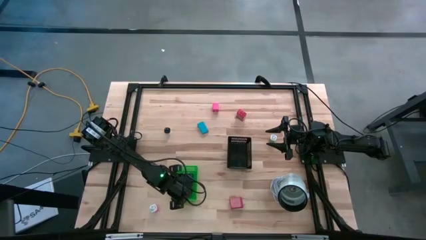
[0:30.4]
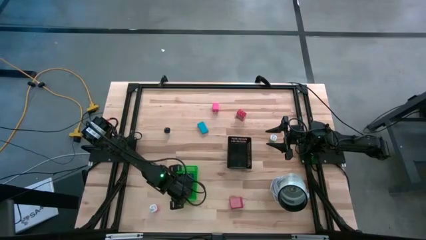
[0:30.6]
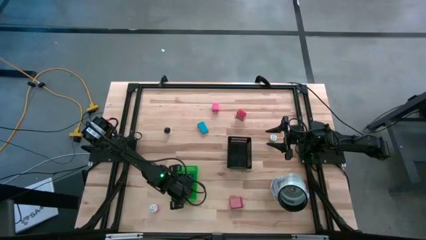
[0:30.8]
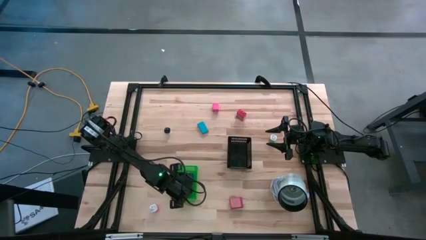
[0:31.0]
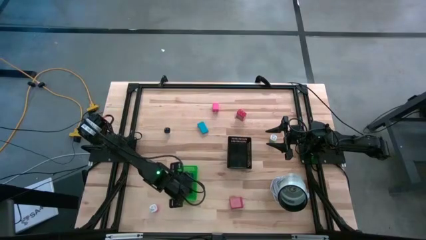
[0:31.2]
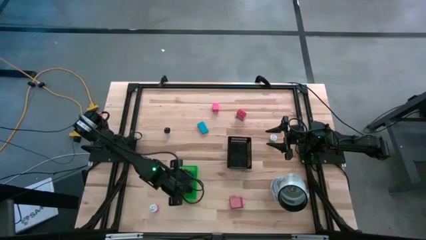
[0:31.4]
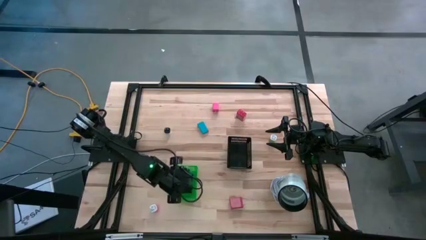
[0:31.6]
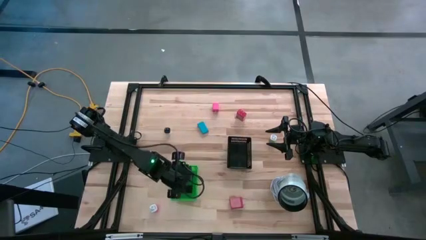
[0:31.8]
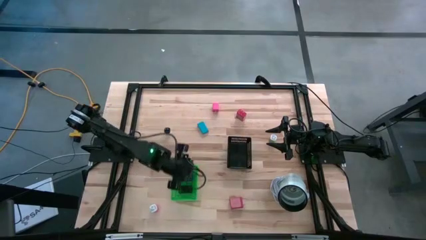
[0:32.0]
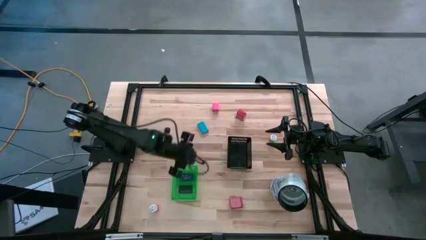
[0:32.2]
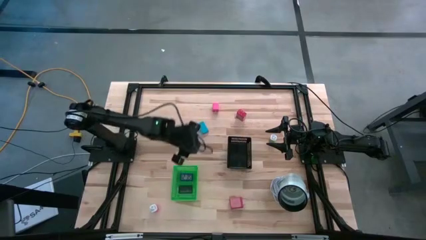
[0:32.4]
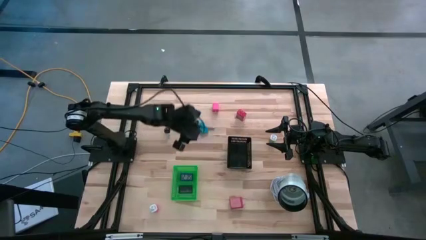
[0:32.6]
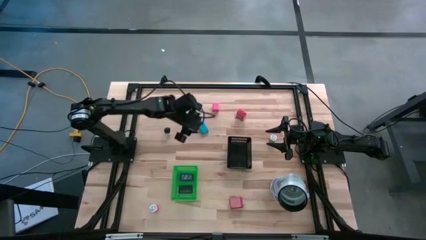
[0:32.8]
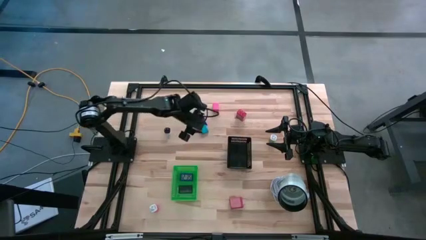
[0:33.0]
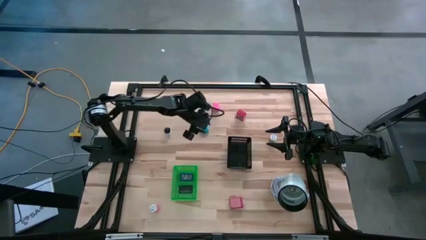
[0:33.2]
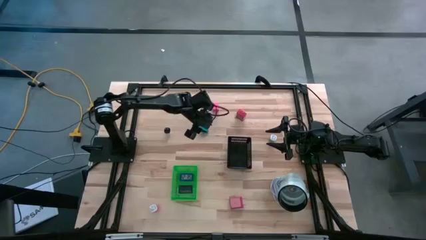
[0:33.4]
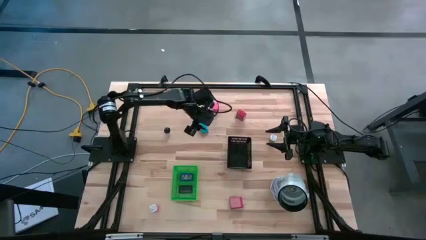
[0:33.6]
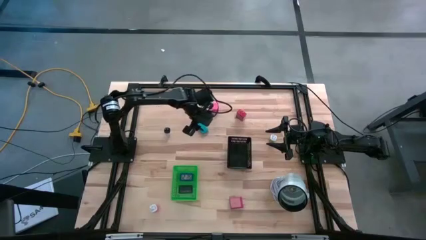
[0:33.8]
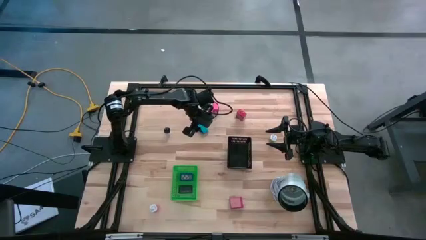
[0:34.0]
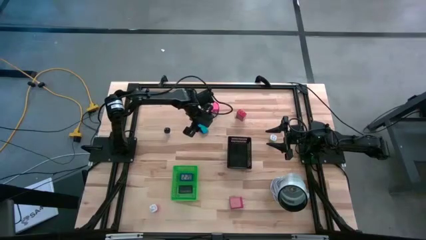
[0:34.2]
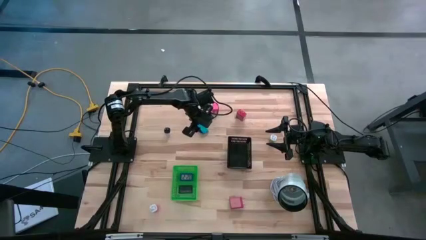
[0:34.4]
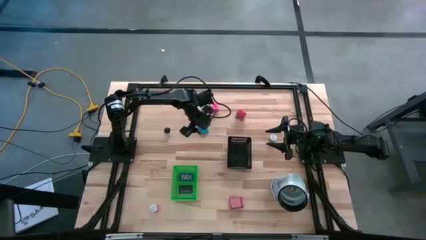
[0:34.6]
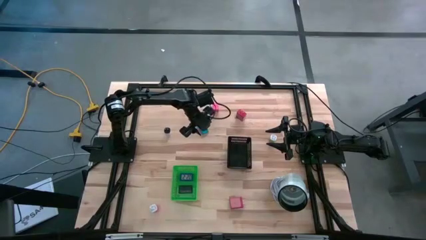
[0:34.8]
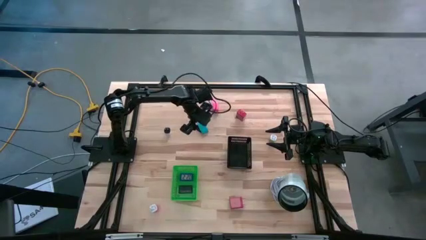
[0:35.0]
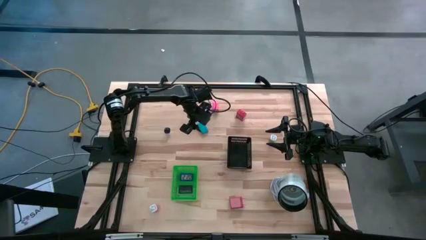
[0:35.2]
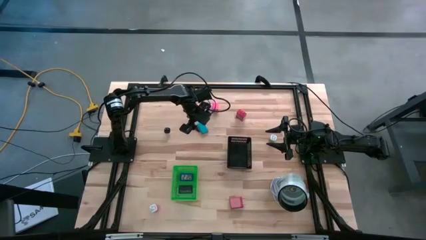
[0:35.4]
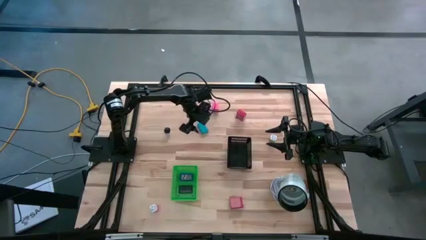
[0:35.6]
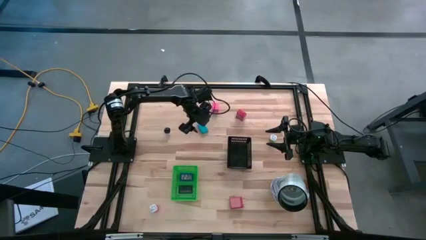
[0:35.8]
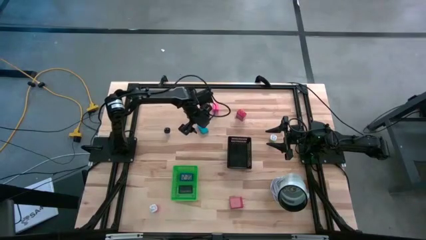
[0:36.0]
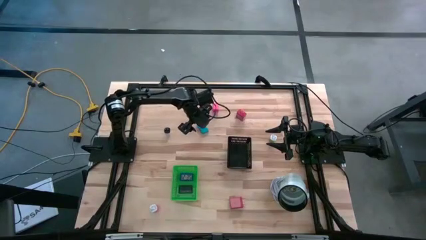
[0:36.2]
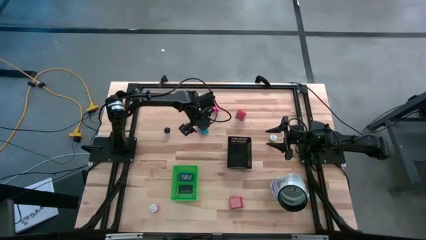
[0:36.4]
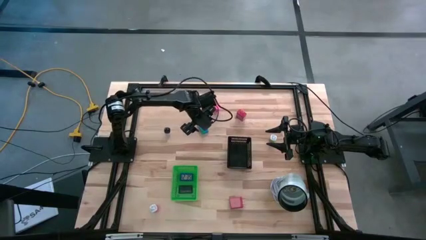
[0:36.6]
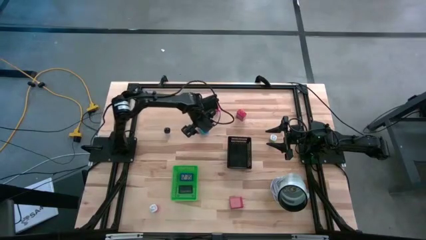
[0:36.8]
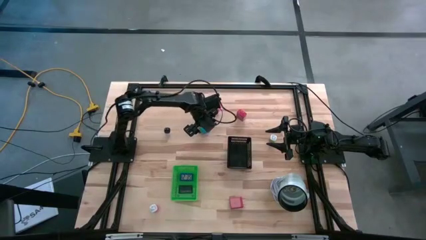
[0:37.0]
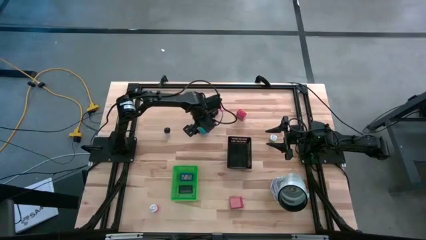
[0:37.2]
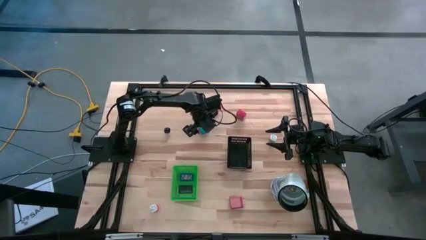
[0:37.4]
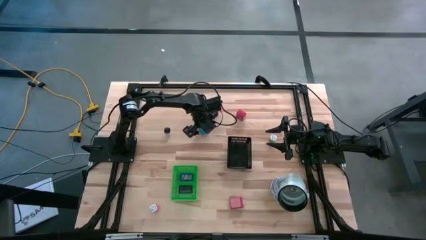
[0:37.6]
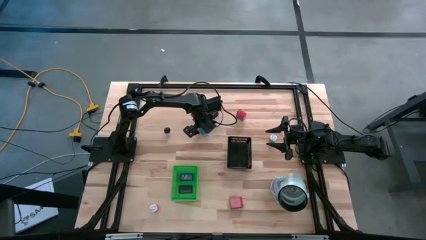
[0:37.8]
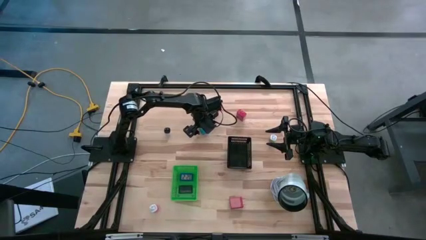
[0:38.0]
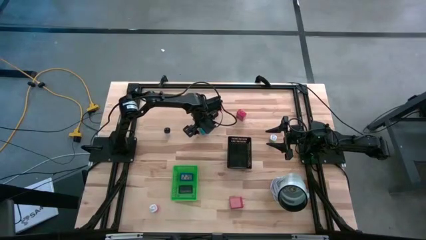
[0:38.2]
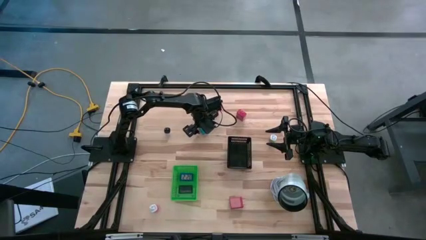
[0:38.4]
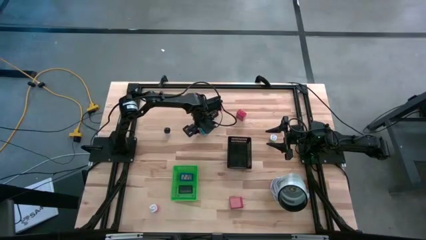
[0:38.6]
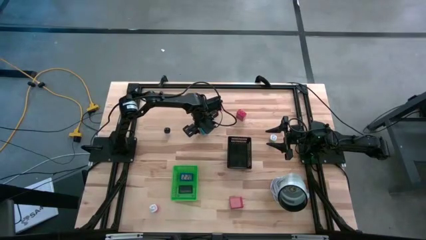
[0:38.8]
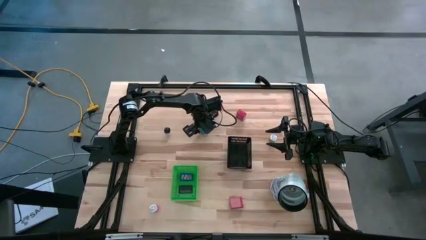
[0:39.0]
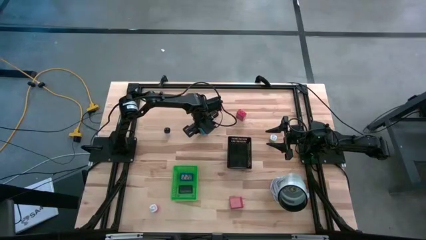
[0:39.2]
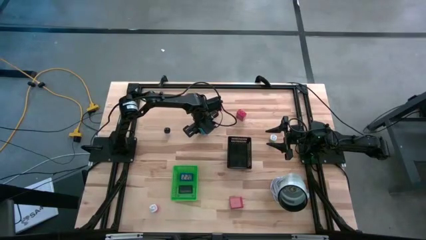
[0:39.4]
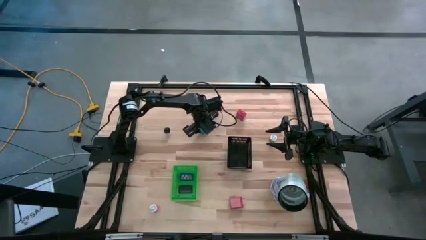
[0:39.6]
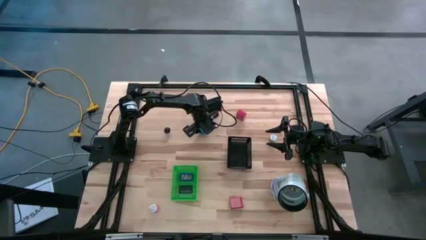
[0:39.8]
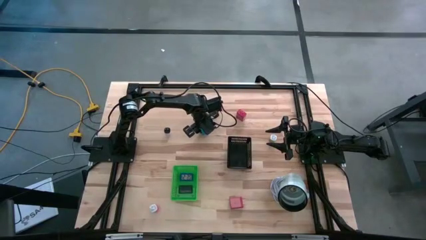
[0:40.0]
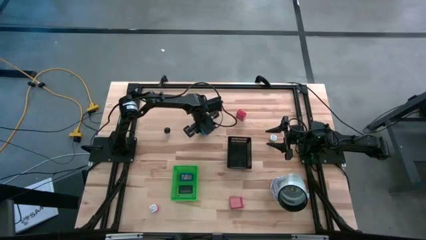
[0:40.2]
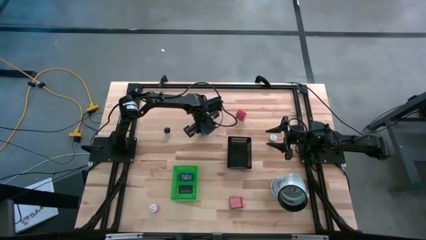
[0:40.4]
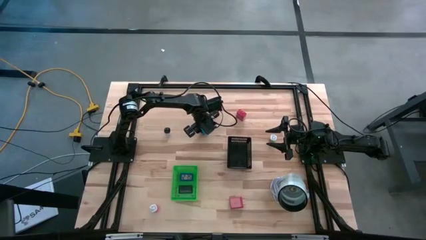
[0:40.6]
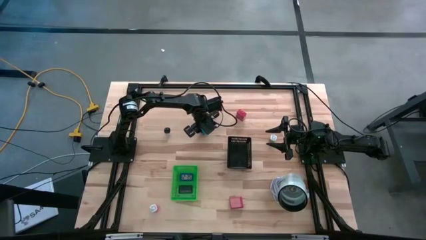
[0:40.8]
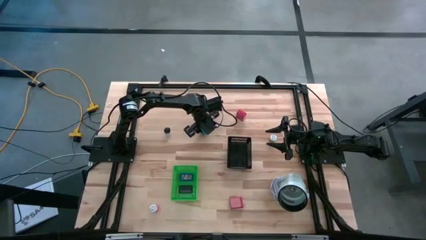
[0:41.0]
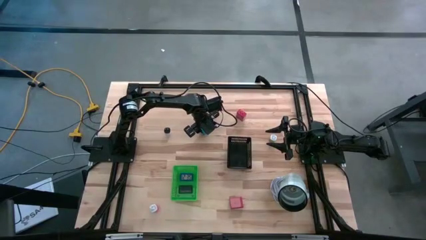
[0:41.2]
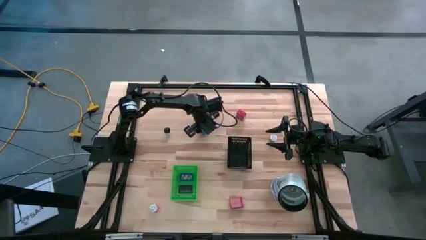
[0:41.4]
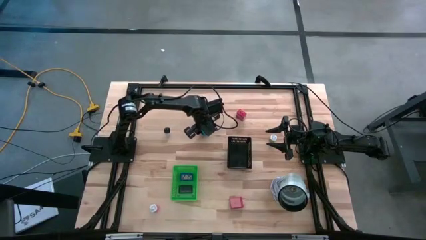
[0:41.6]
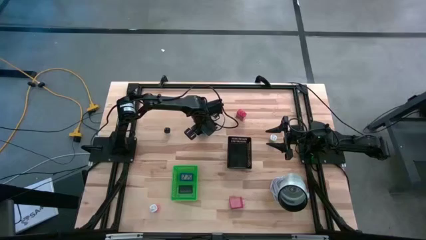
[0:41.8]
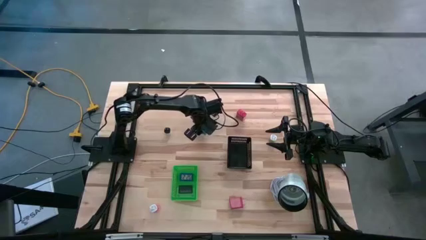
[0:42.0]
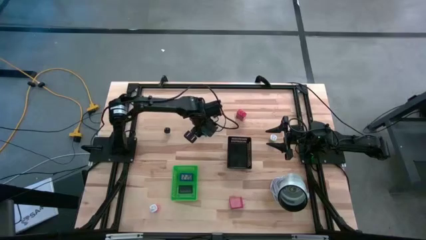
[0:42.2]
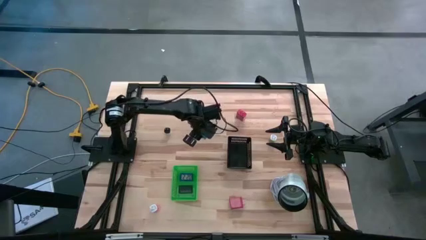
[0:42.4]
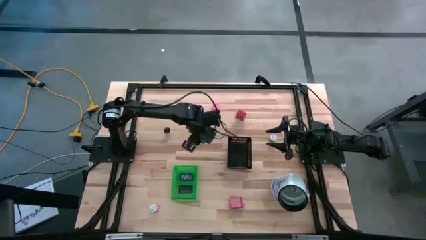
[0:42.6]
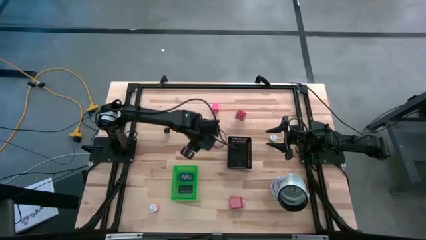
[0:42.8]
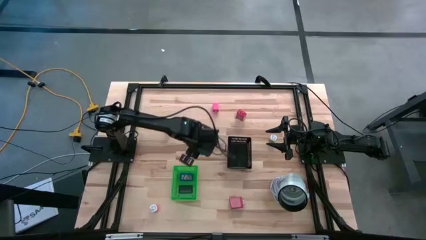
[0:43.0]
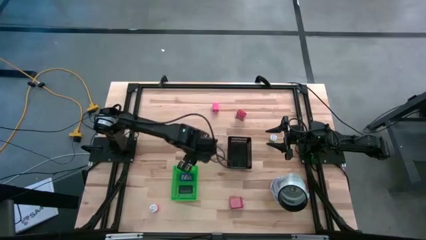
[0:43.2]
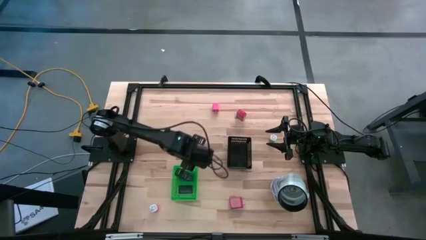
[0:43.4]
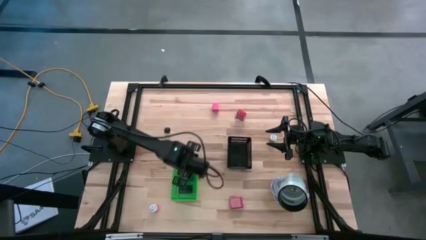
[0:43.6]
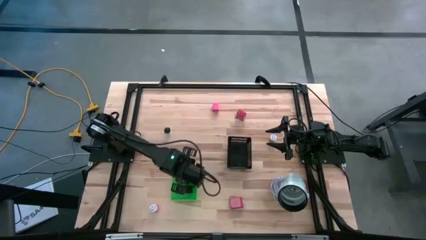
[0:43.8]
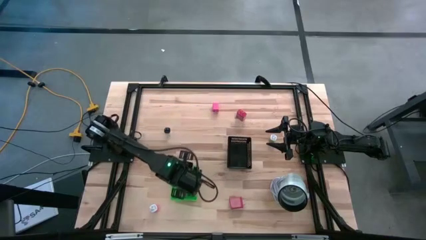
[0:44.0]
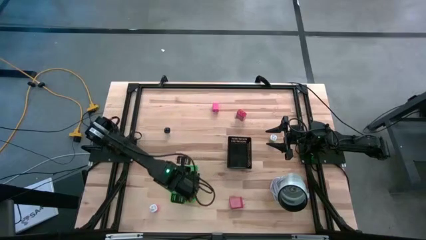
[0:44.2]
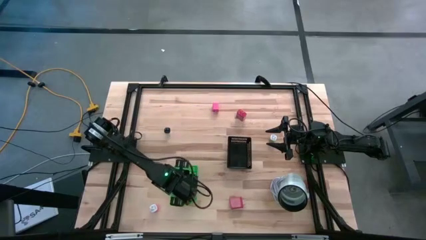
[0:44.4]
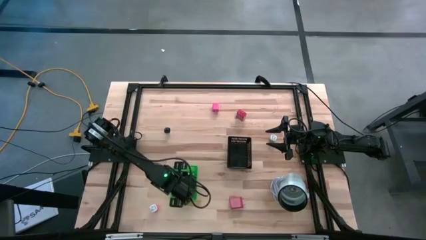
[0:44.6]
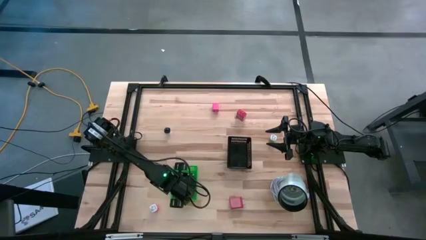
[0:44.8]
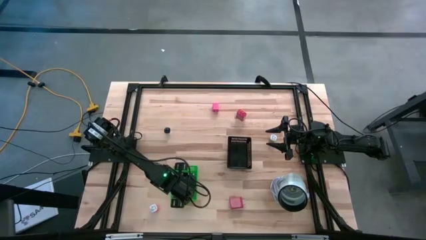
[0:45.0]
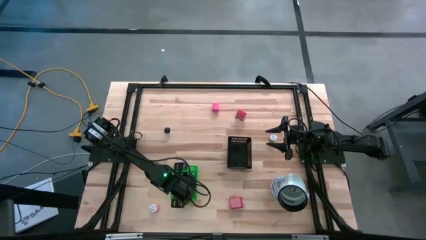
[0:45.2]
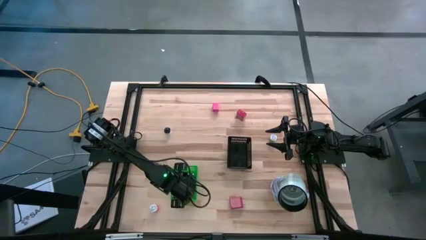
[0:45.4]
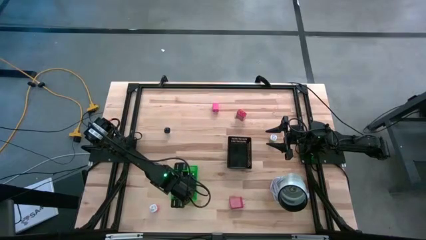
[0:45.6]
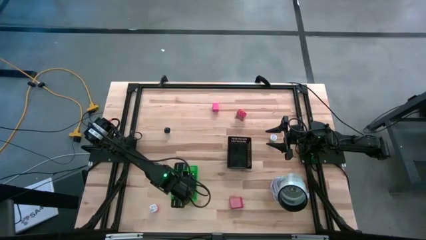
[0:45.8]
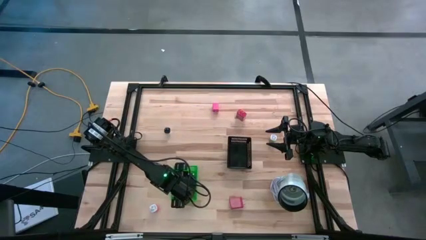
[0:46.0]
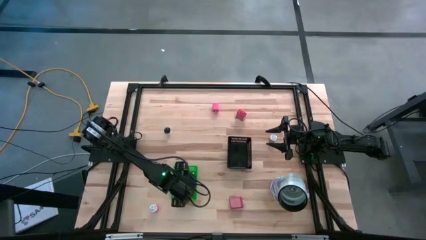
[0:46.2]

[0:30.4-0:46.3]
Task: Pick & Place Office items
Put the light blue digital clock into the green bin
